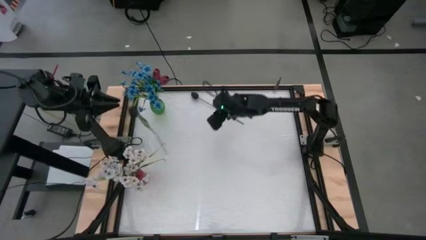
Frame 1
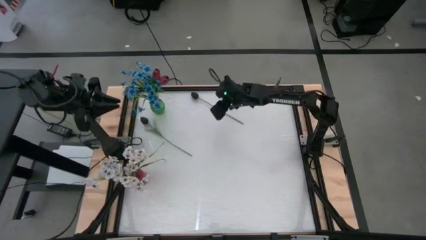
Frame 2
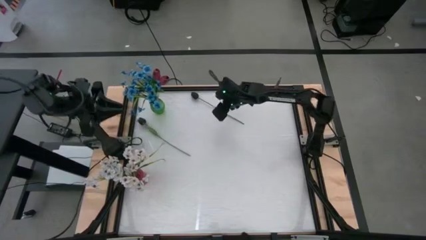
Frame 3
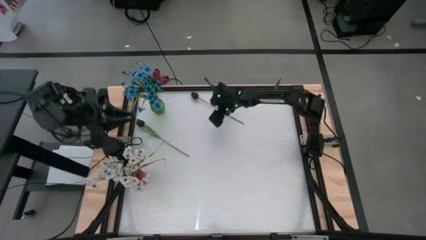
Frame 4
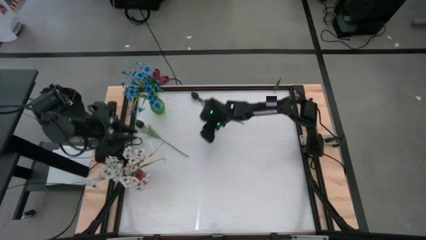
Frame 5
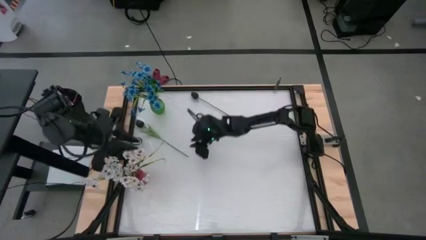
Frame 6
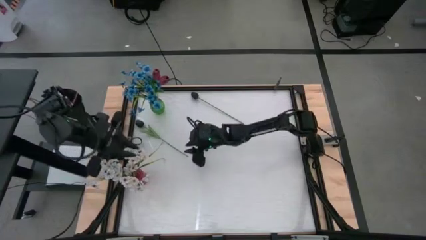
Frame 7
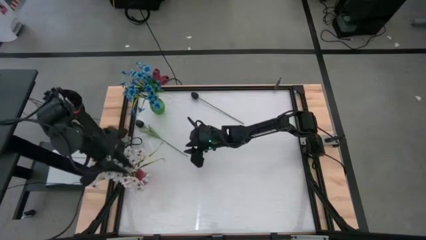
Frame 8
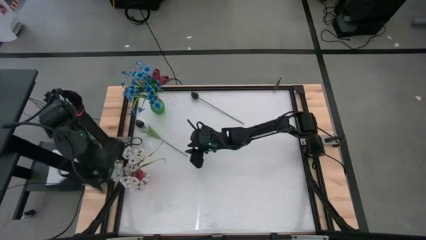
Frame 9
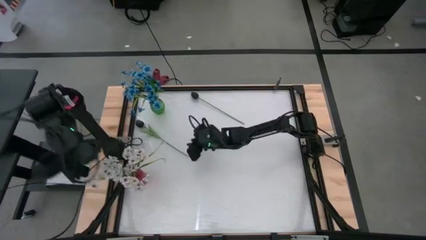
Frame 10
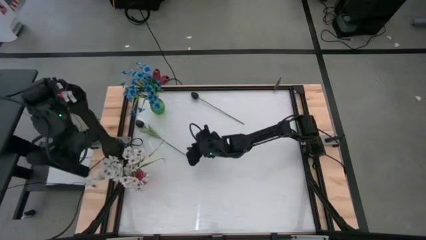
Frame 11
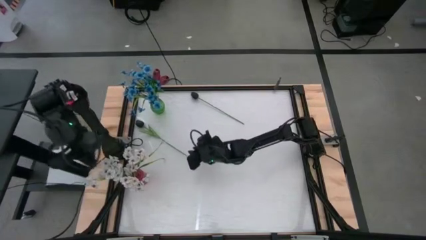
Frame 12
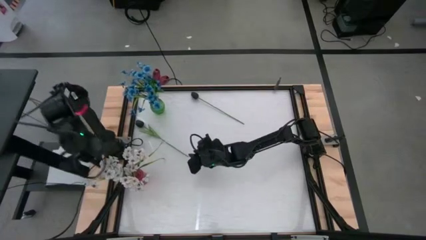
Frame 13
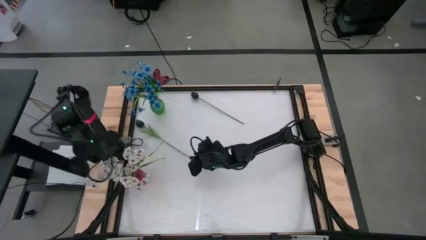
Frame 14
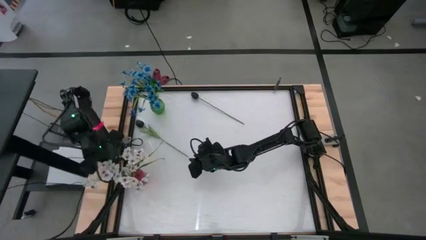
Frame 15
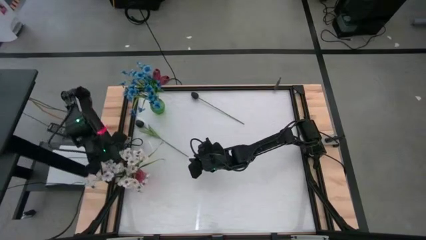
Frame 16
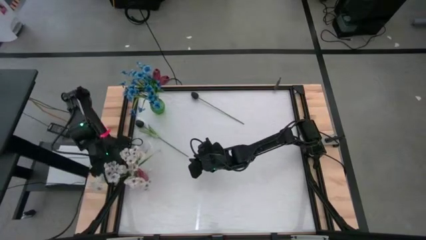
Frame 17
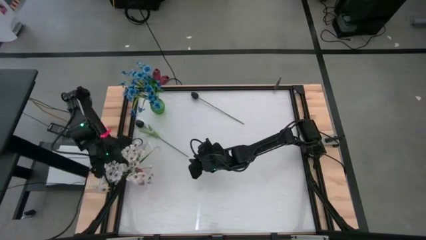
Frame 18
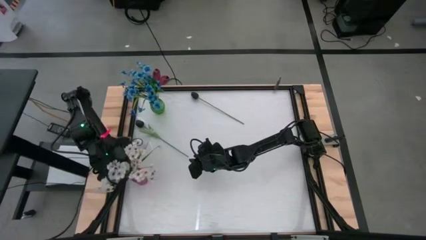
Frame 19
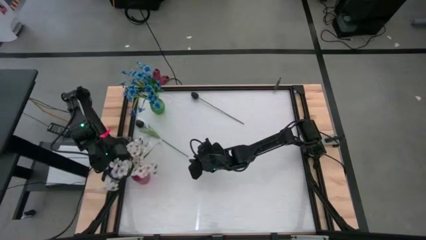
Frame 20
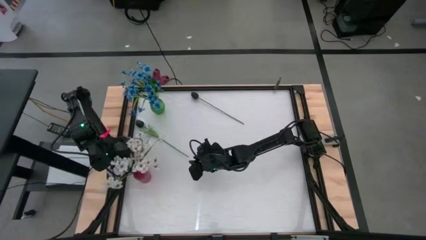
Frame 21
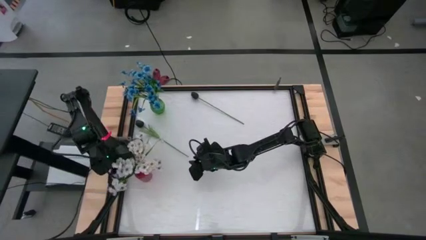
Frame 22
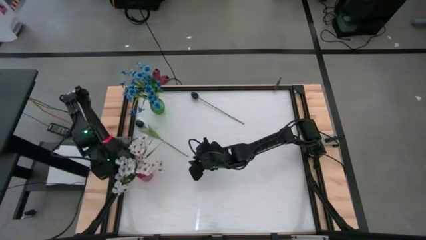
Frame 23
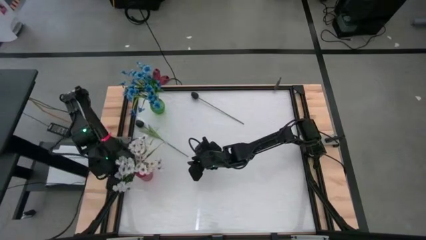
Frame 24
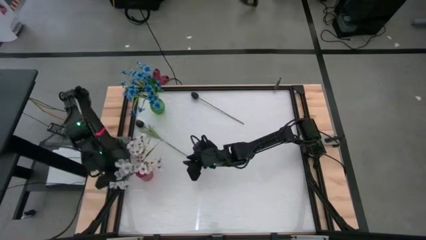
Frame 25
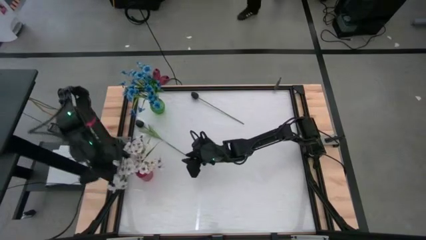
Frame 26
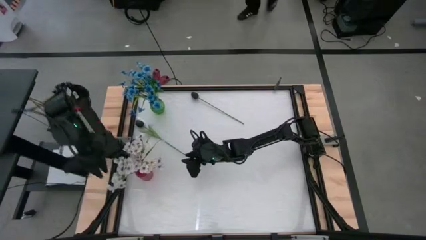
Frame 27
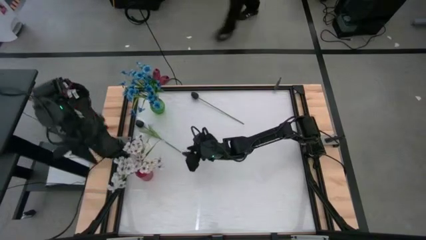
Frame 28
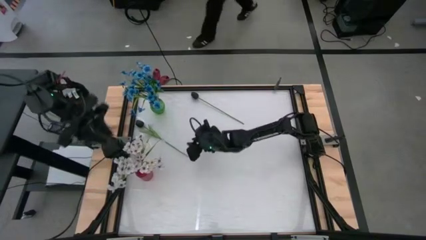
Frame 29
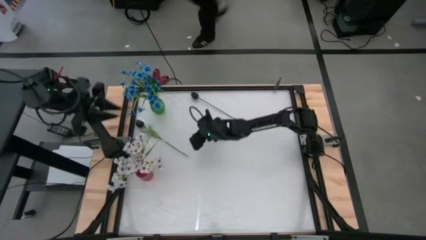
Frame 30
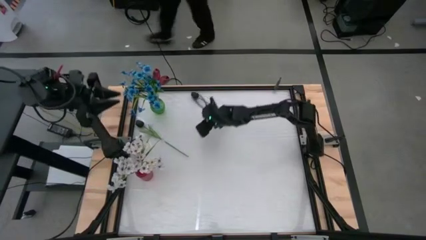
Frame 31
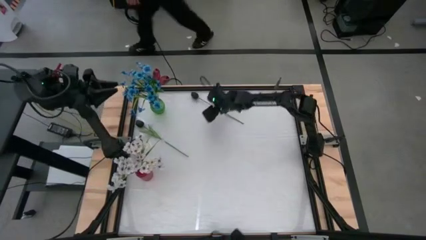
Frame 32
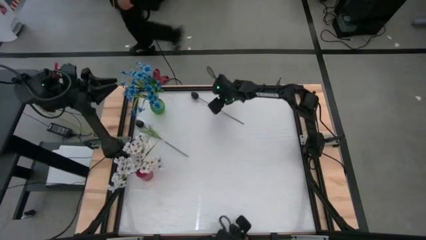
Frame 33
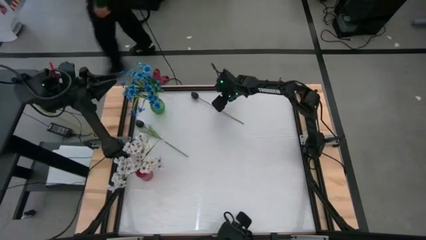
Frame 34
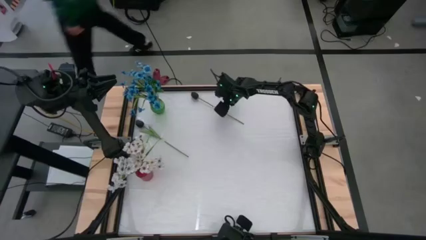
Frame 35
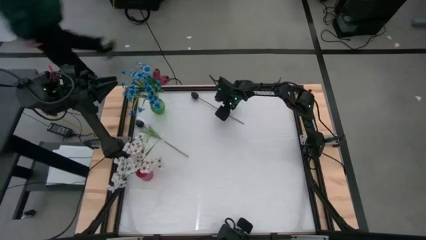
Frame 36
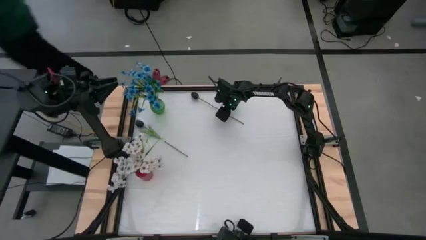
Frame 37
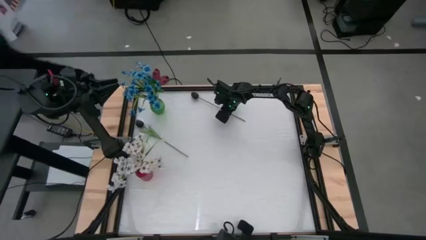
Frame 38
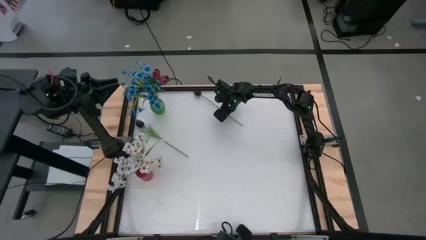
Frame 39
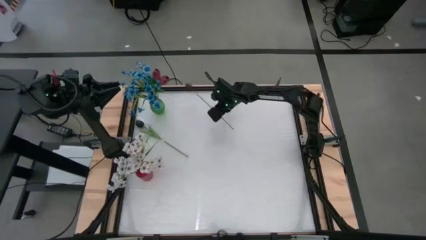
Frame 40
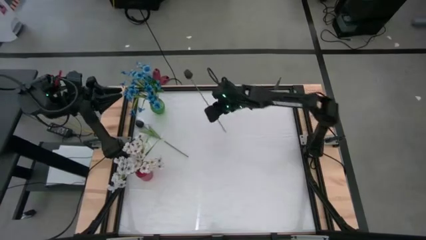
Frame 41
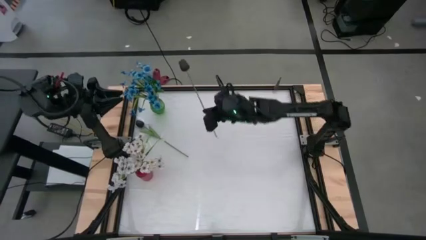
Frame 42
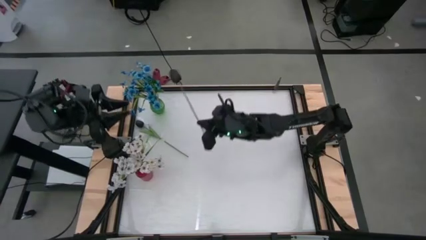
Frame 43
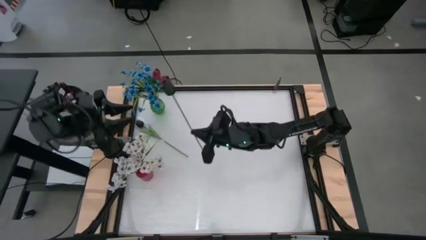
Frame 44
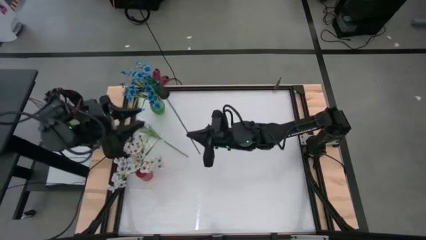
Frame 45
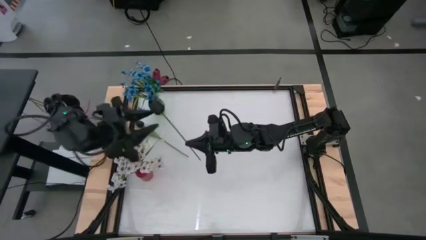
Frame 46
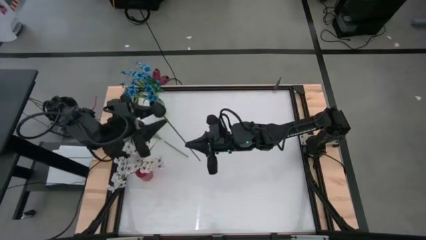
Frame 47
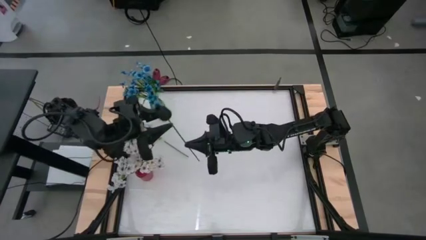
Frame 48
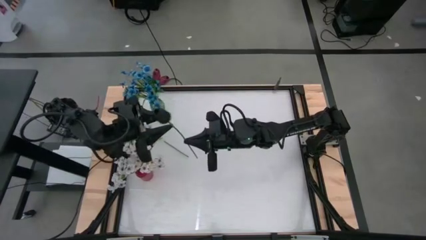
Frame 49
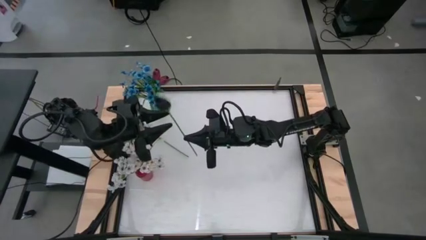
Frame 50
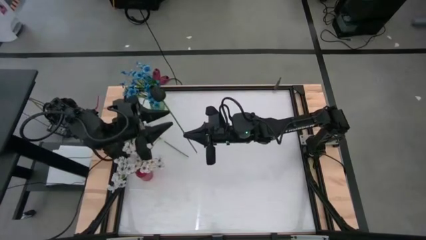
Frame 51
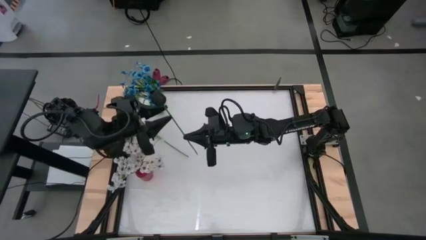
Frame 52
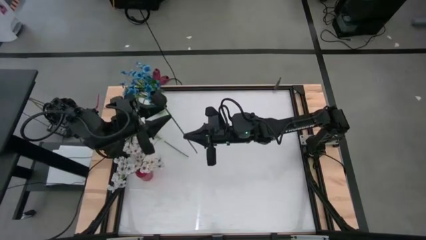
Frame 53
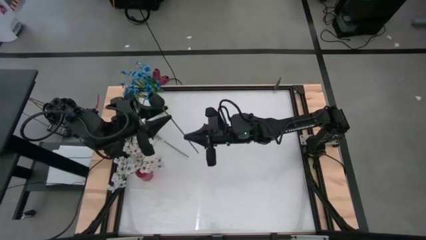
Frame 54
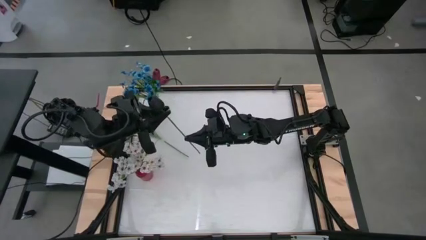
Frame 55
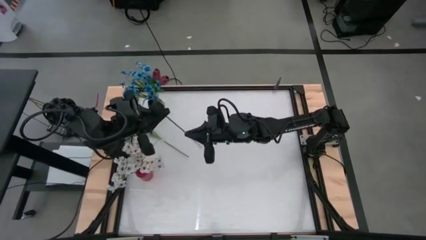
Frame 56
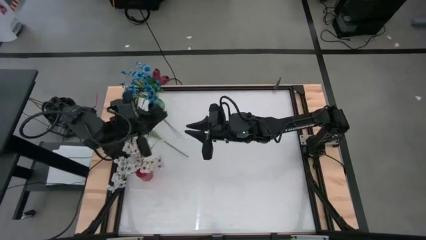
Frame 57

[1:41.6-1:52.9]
Task: Sort flowers into vase by color
Put the right black tulip into the red vase

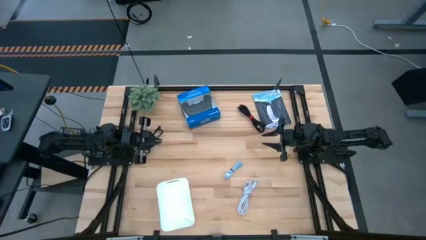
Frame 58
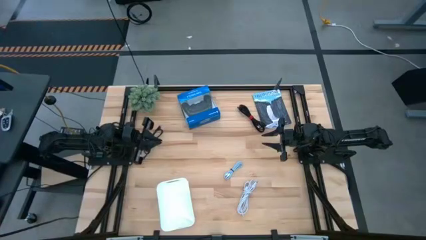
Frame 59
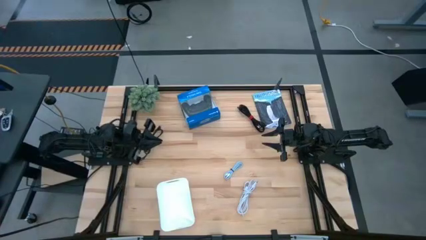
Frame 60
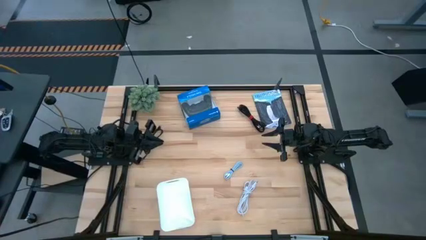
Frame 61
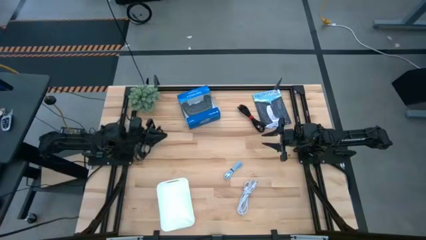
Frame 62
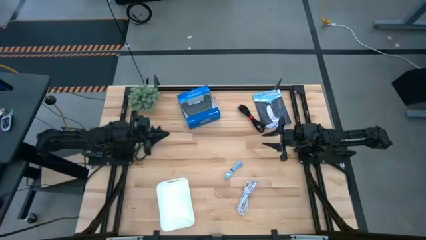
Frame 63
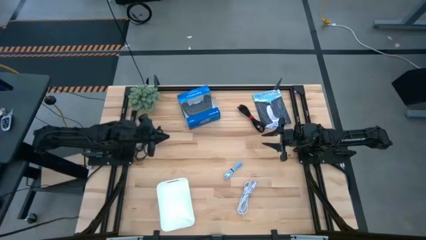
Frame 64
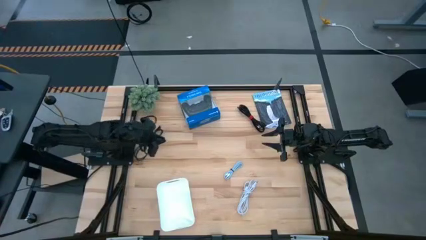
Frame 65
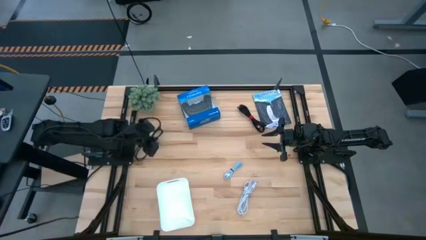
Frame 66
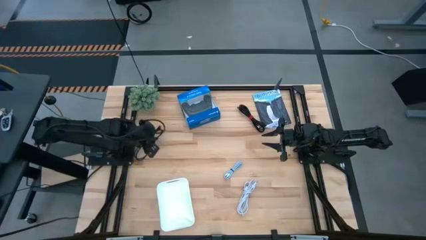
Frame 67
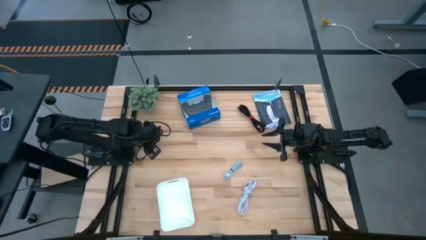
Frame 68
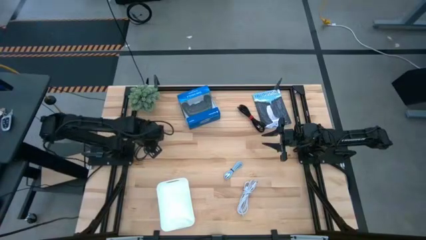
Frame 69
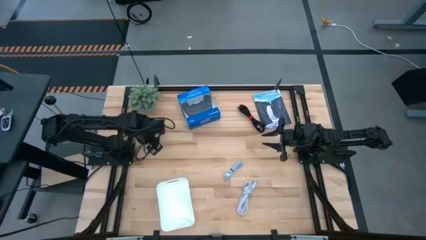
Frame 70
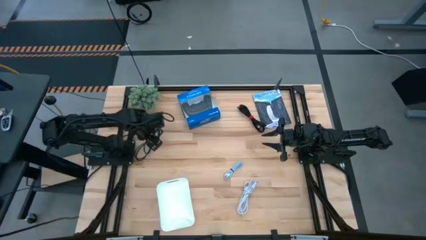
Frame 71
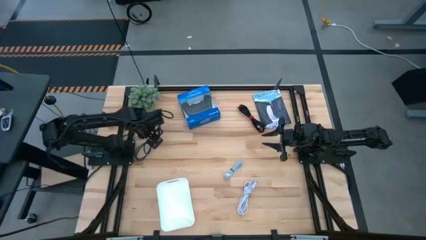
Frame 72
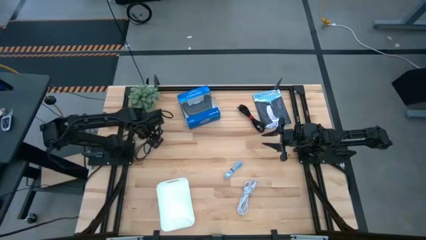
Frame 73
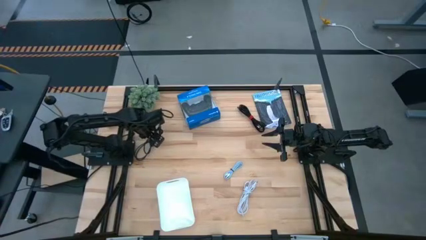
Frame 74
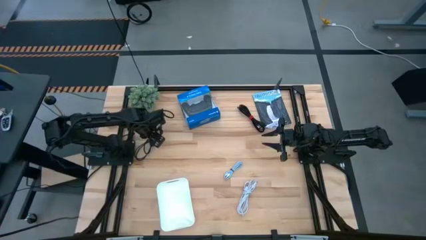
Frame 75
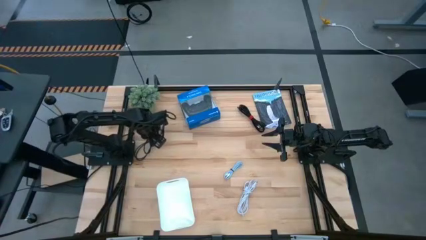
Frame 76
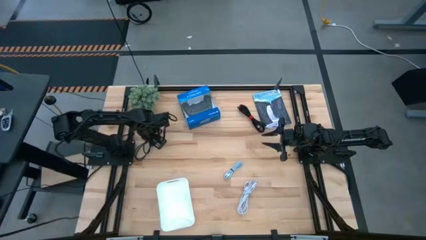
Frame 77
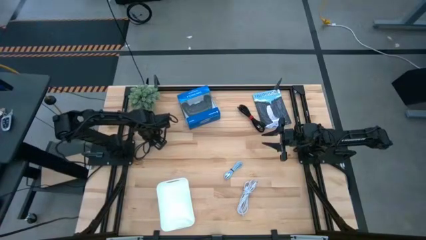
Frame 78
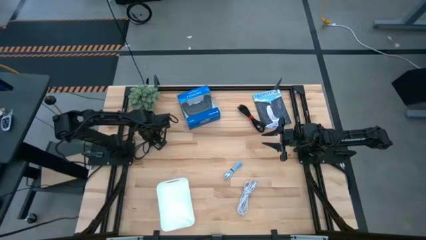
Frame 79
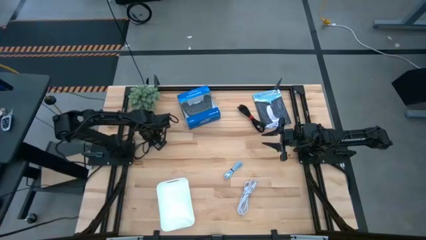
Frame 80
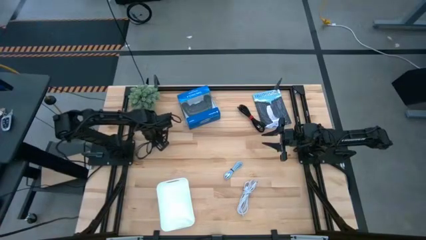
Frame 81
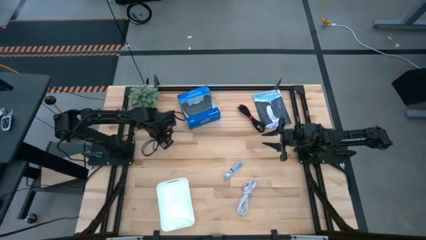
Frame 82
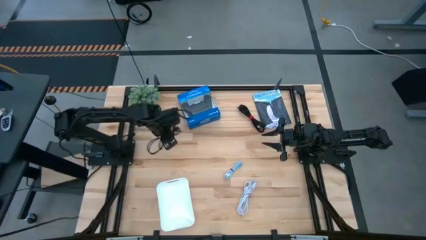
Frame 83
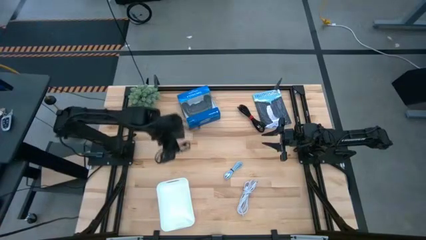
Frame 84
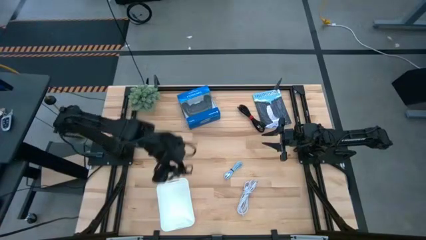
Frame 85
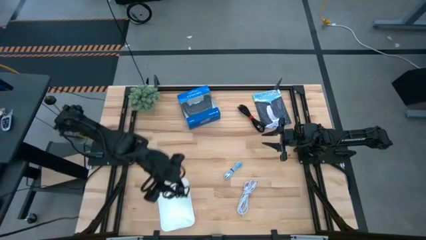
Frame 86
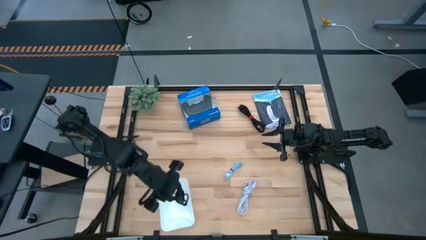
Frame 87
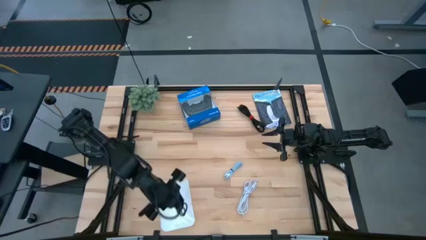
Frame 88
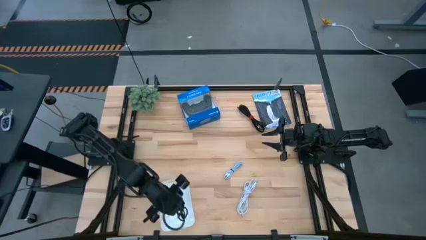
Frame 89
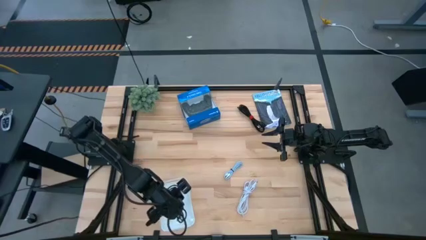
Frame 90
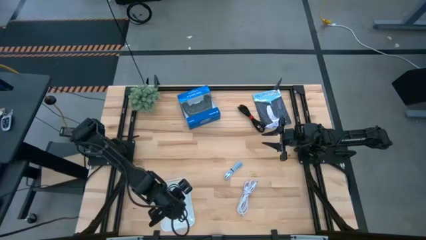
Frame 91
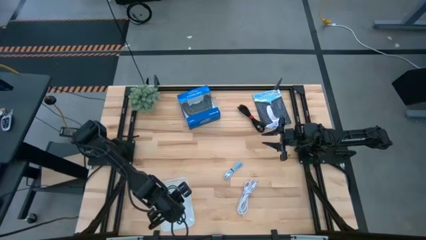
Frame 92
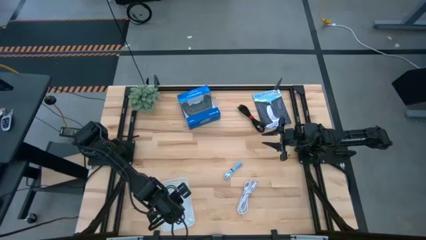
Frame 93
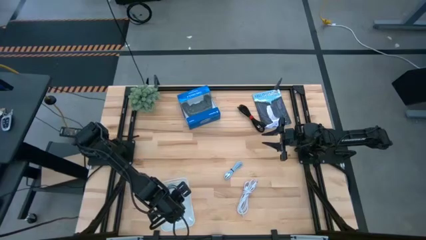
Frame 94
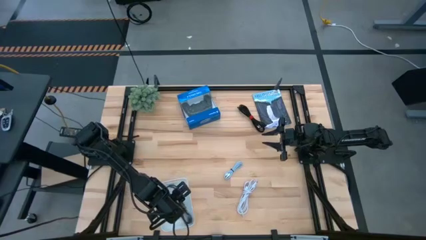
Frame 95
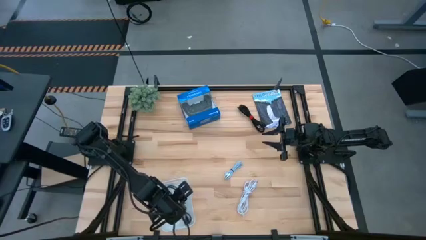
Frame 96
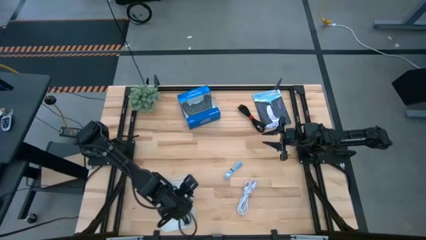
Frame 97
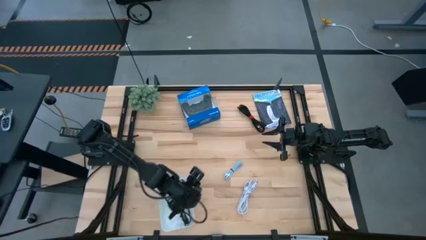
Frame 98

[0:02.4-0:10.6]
Task: Pick and place USB-C Cables
Put the black HDMI cable into the white bin
